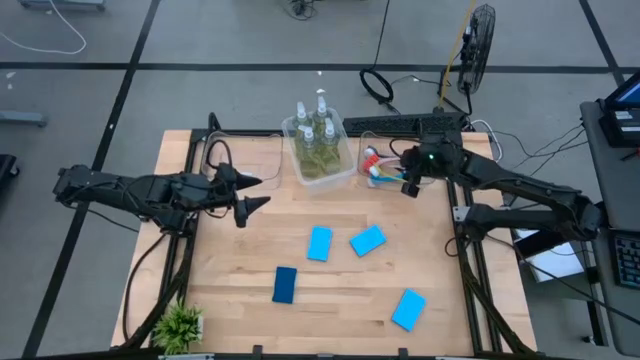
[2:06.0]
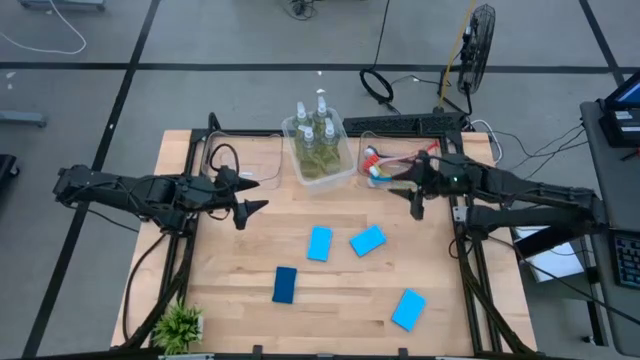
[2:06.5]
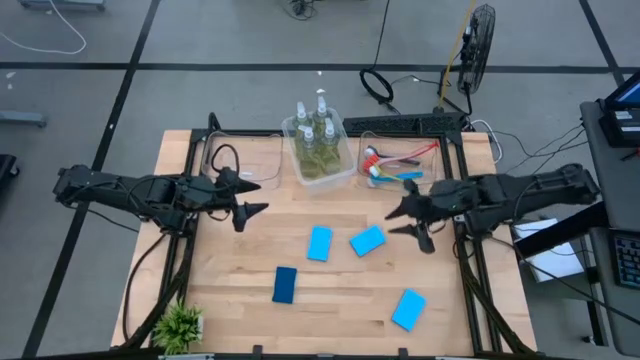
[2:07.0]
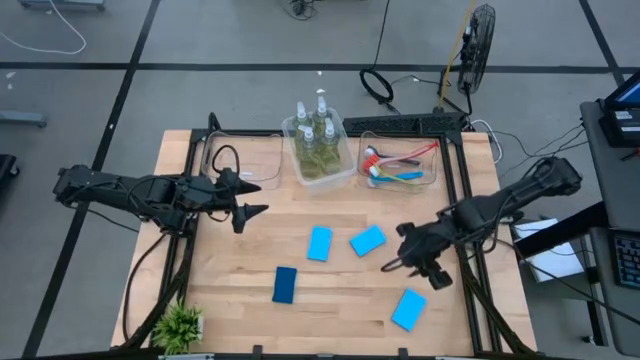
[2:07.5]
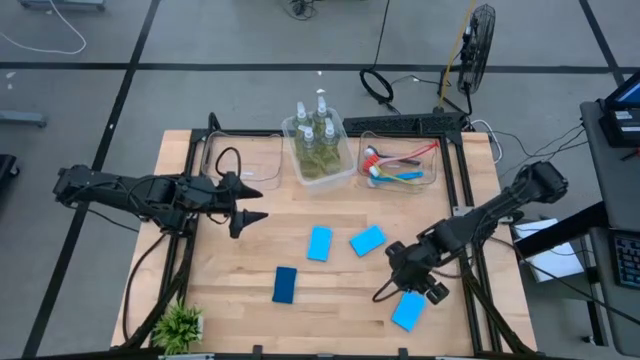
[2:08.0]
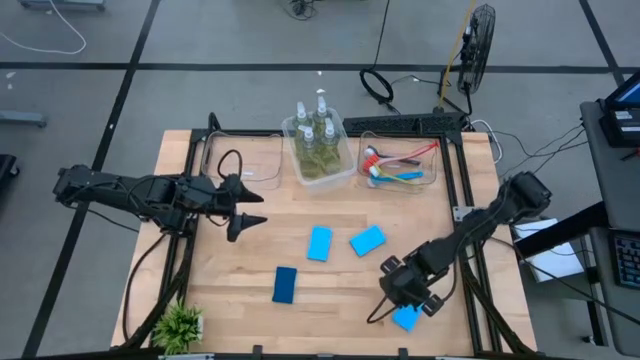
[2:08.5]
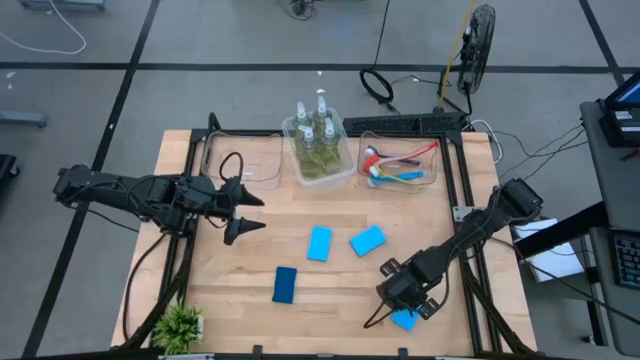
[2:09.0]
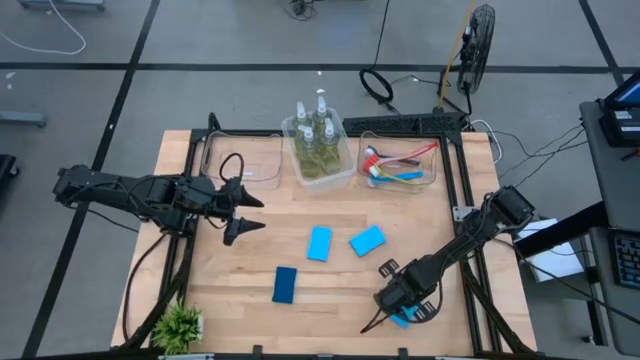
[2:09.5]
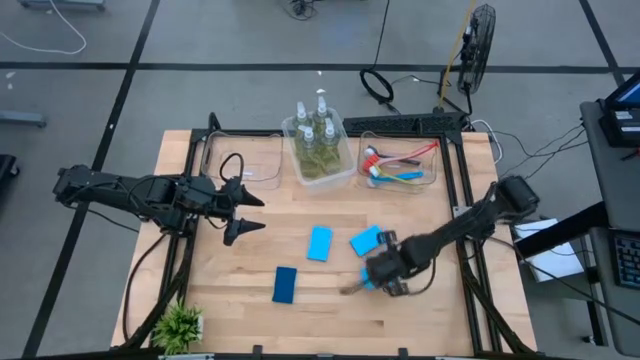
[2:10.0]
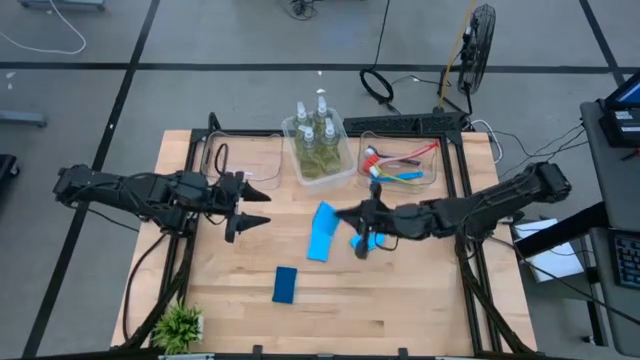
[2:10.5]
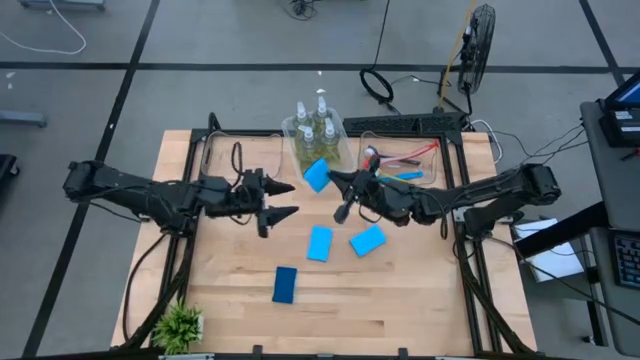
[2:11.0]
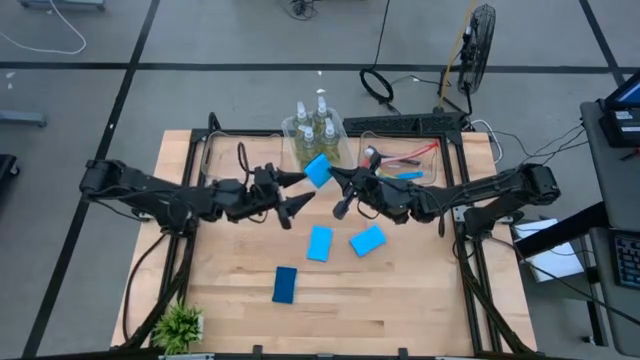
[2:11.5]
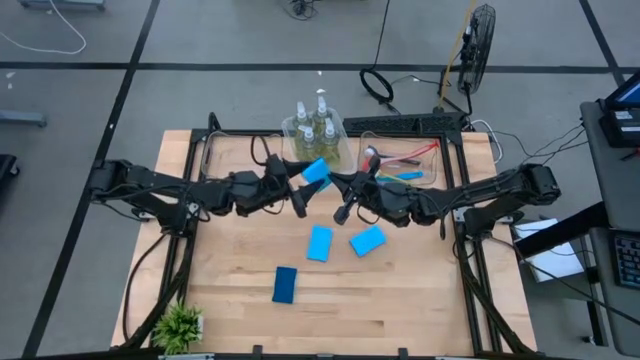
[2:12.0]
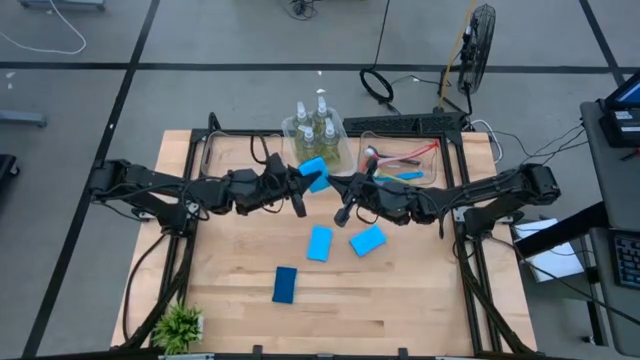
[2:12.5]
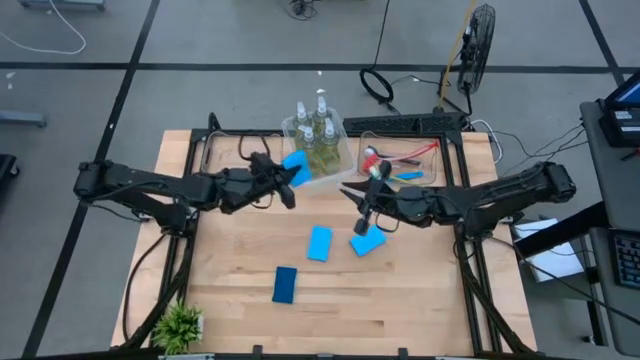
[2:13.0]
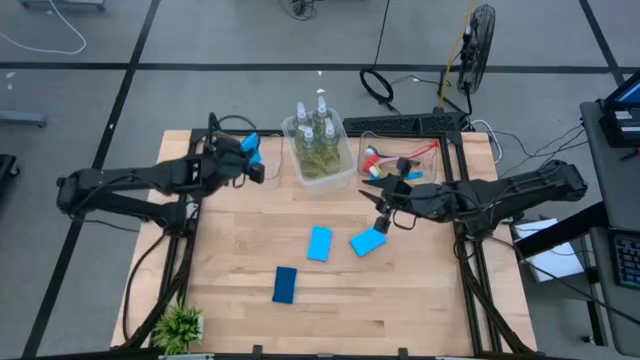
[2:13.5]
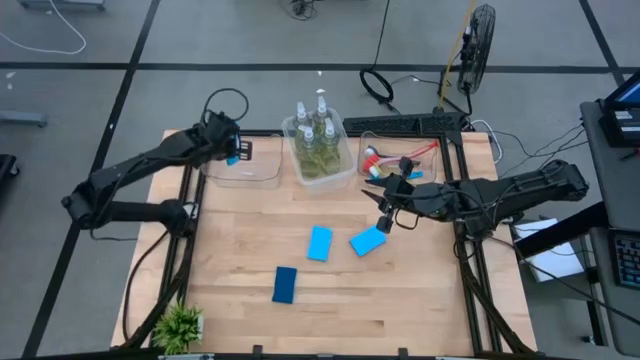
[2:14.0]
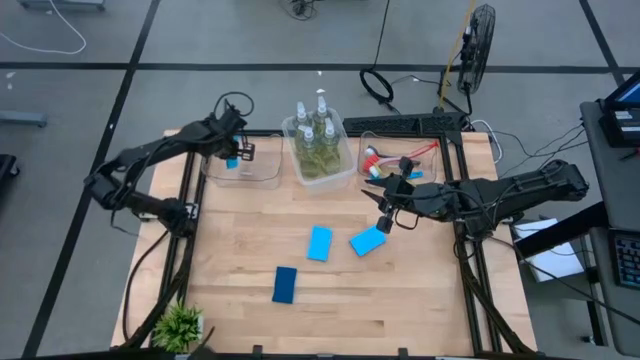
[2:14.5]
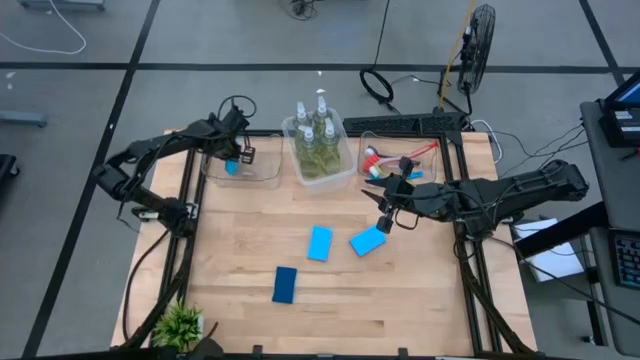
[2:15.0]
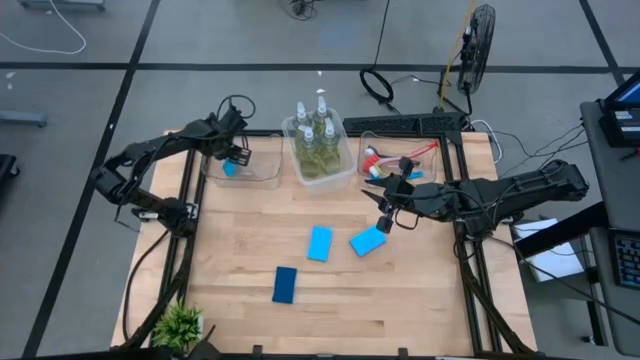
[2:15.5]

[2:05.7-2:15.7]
Task: Pick & Place Kitchen Sink Supplies
Put the blue sponge into the left transparent bin

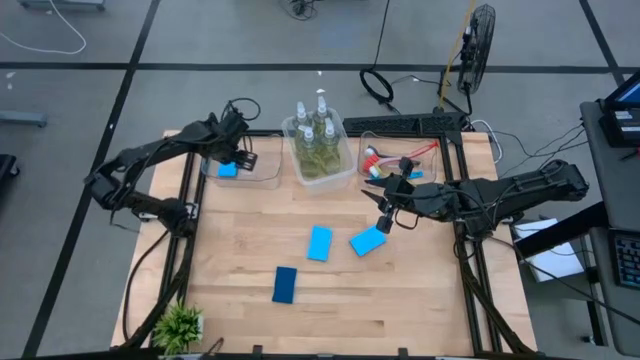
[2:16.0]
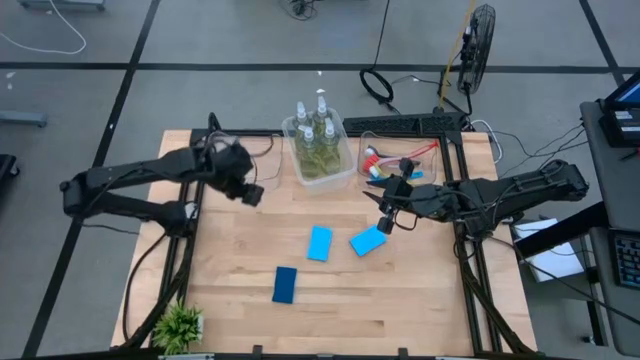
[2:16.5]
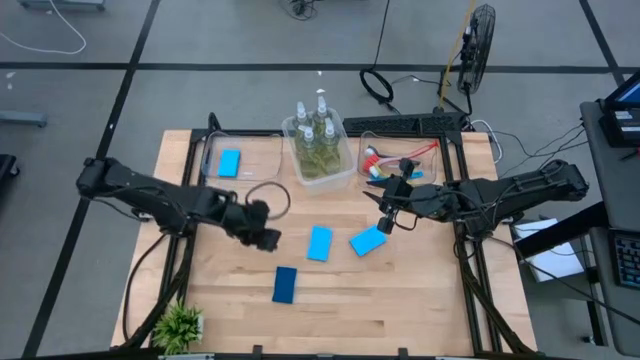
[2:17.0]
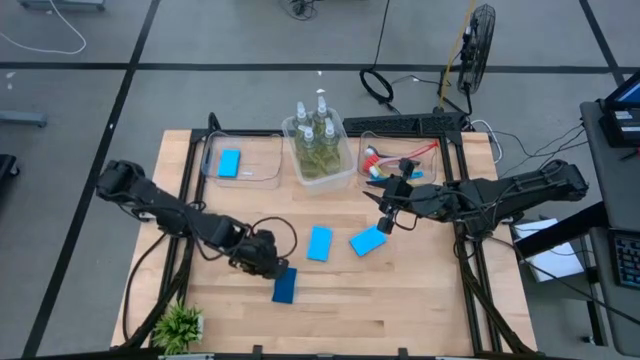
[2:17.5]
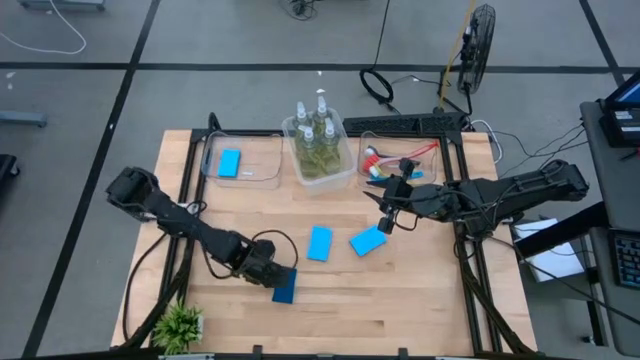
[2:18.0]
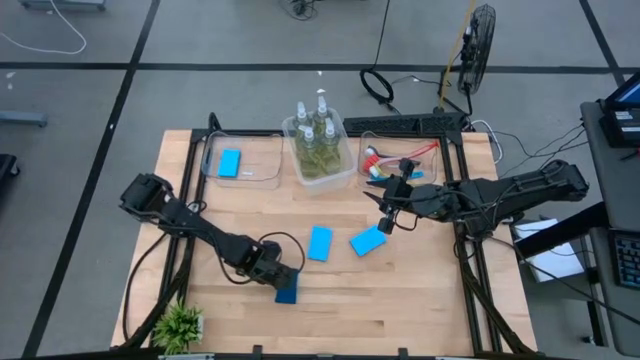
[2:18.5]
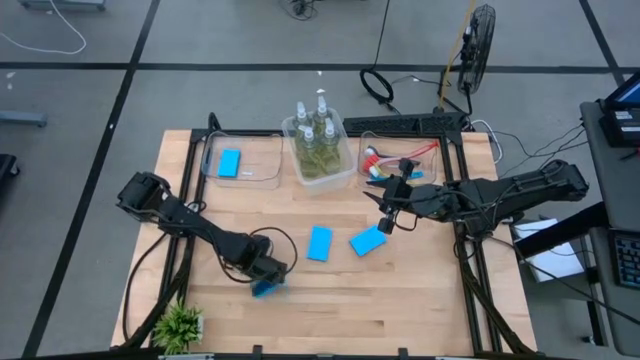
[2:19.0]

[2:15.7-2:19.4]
Put the blue sponge into the left transparent bin

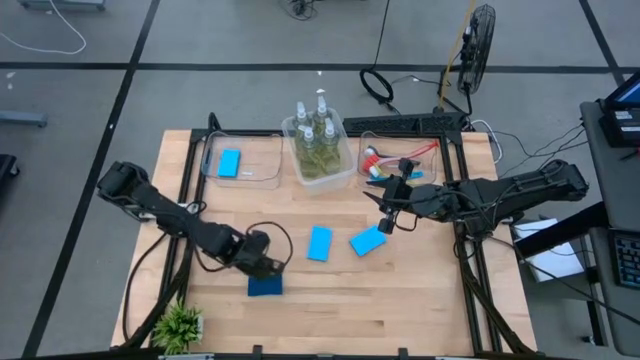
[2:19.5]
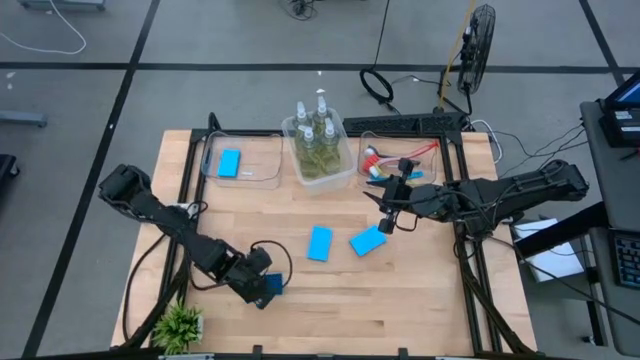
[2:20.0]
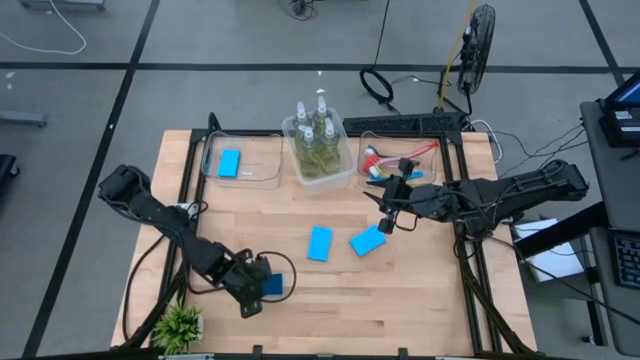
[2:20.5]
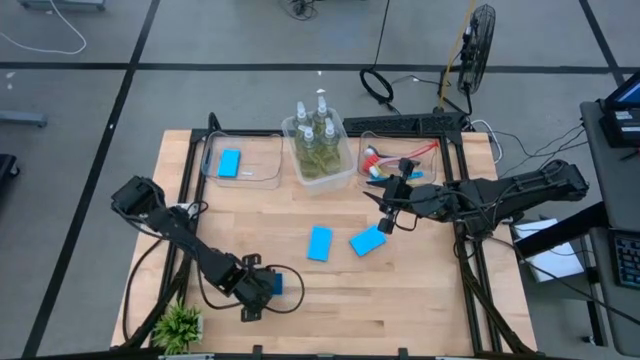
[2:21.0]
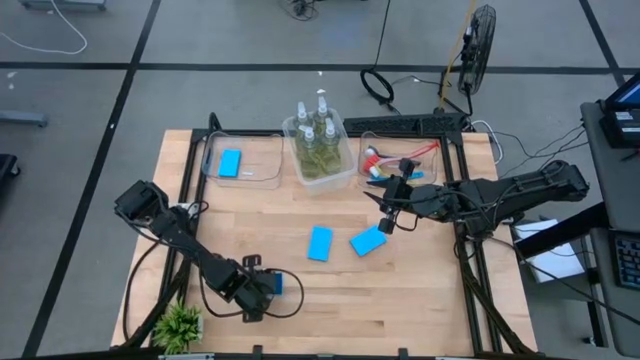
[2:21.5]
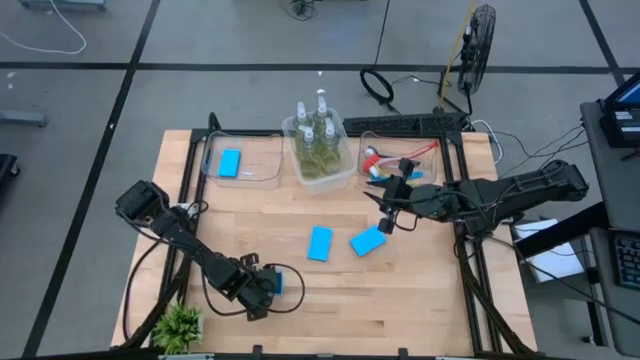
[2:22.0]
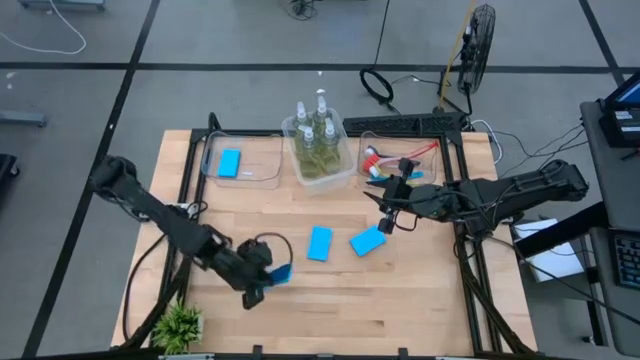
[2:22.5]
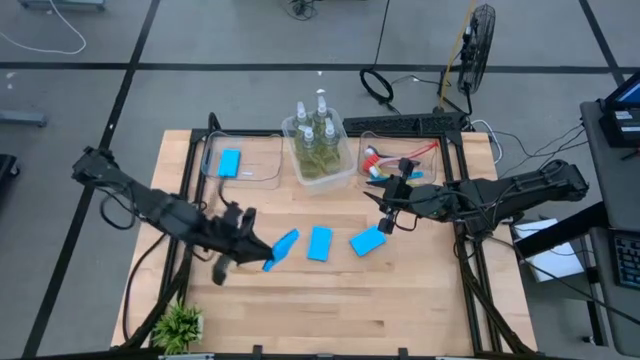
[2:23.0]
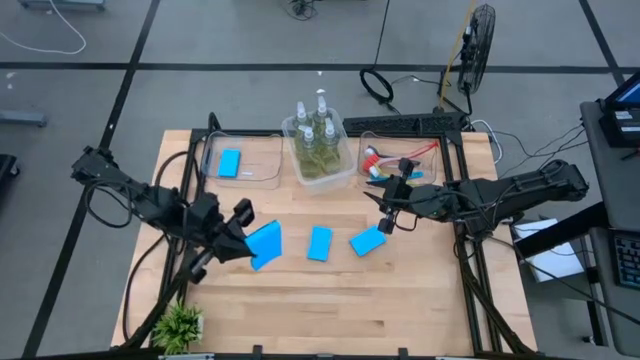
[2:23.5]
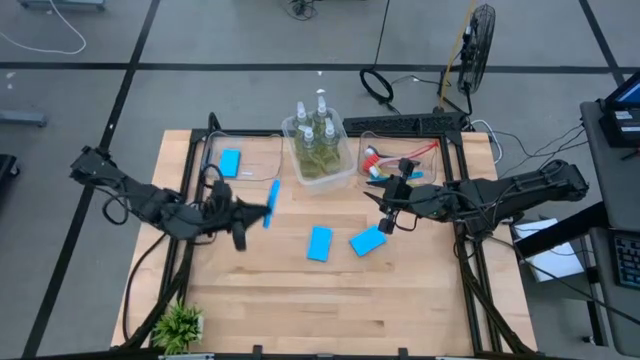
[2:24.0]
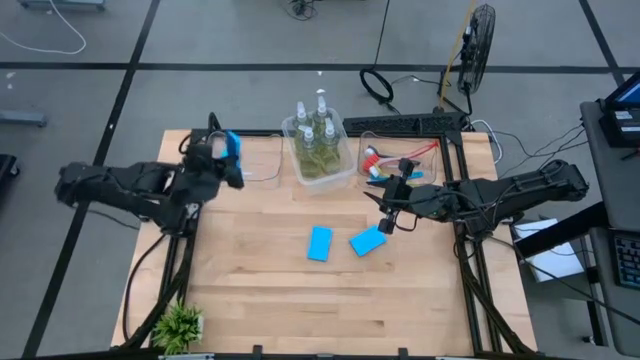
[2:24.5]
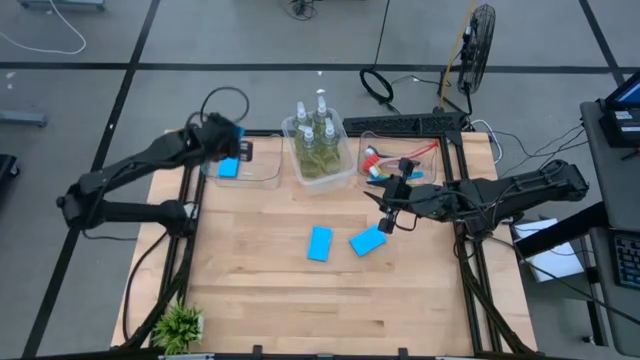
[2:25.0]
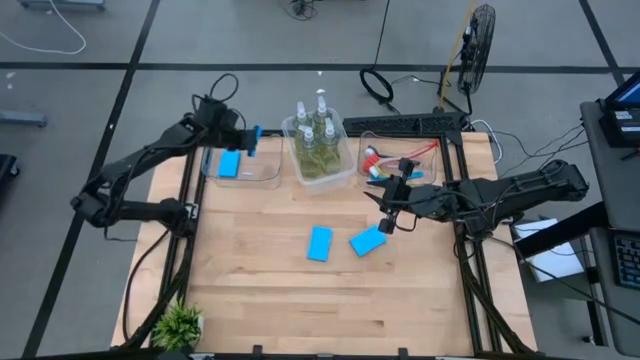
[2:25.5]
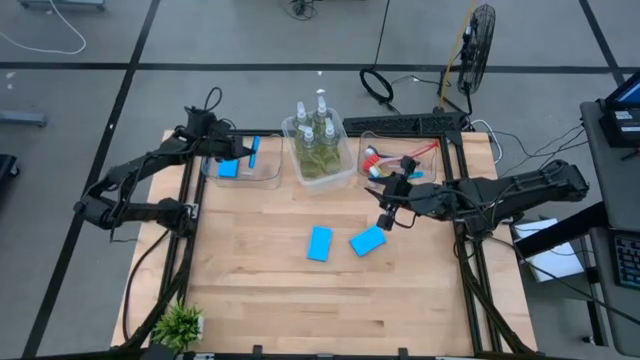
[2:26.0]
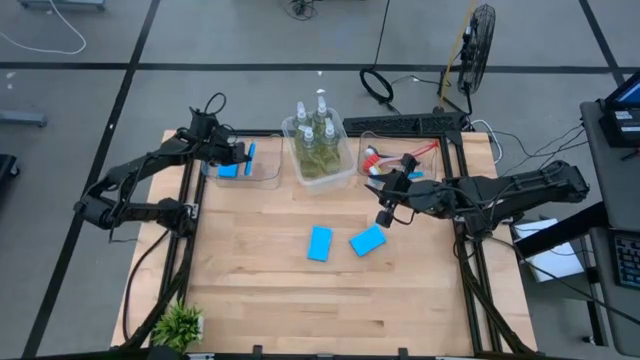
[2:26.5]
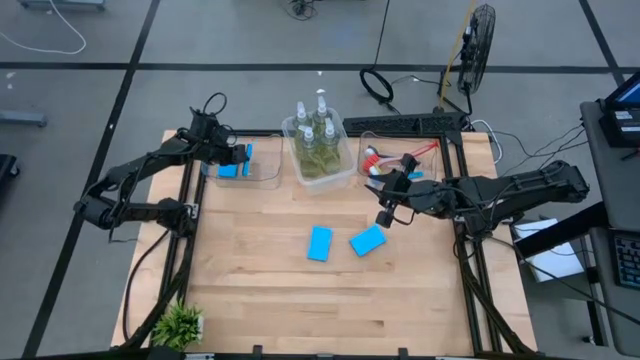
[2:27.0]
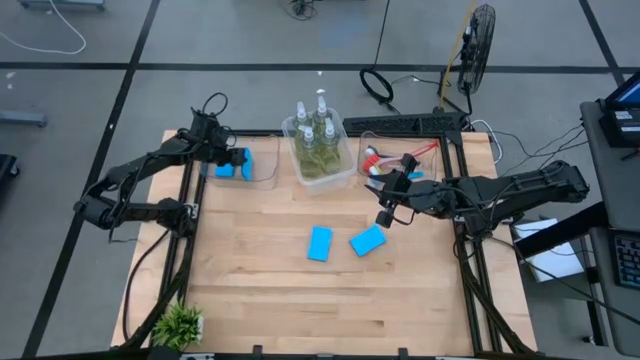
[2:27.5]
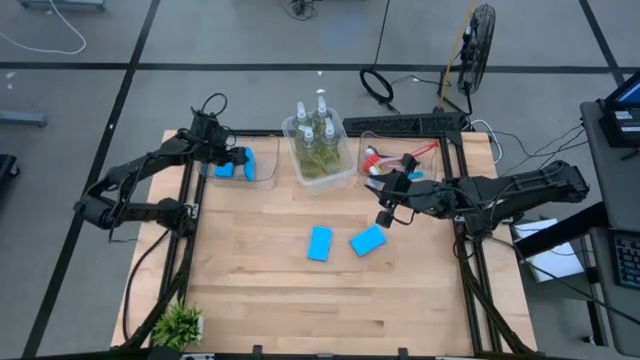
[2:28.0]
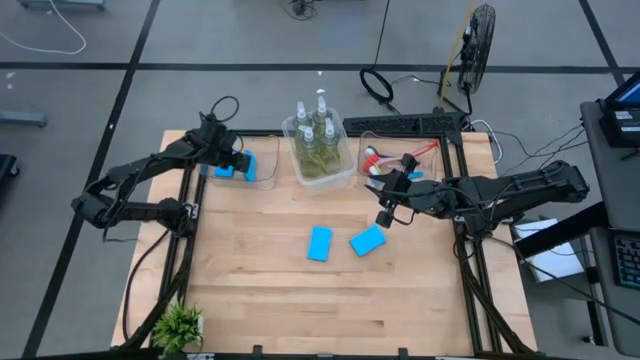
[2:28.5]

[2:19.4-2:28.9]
Put the blue sponge into the left transparent bin
